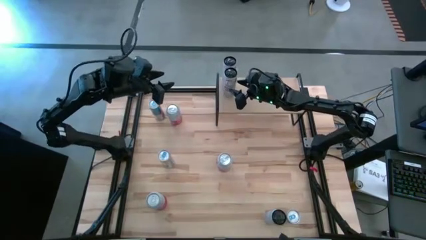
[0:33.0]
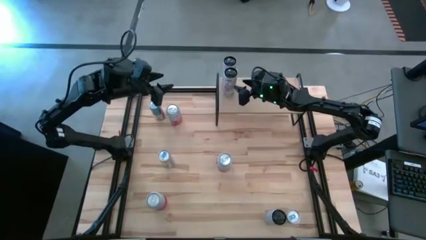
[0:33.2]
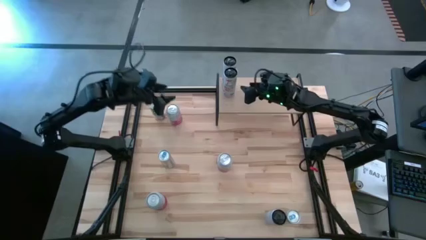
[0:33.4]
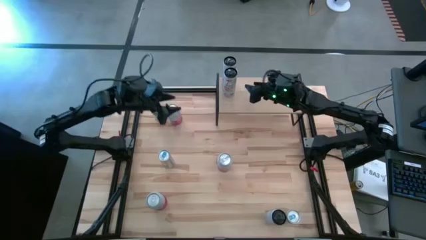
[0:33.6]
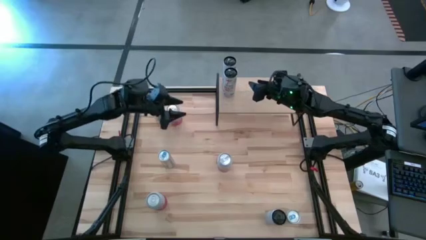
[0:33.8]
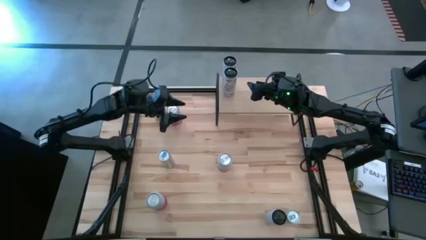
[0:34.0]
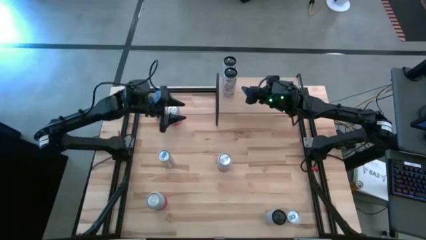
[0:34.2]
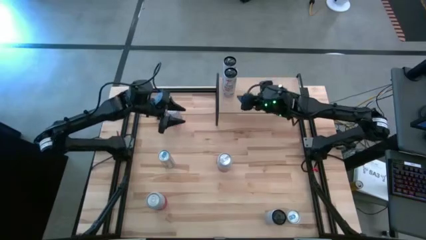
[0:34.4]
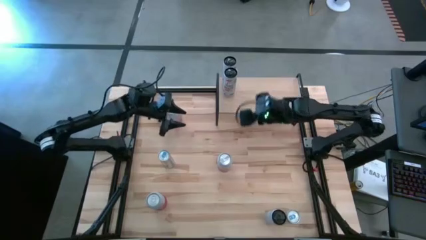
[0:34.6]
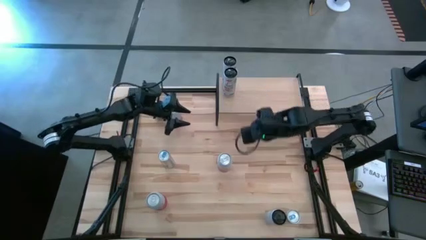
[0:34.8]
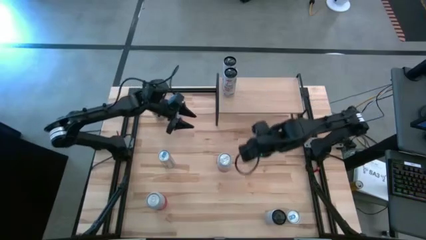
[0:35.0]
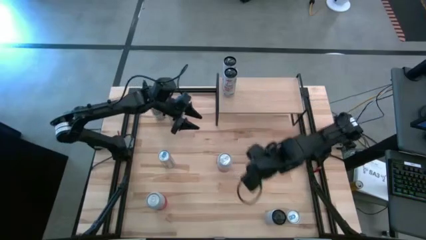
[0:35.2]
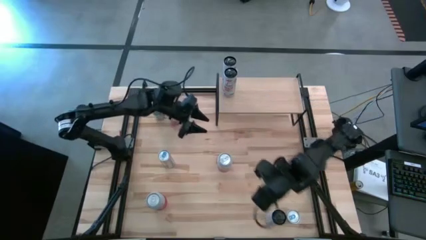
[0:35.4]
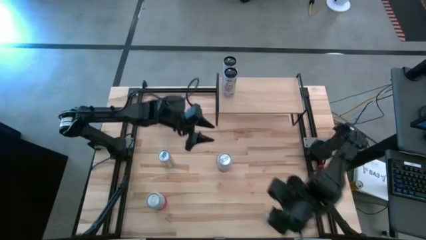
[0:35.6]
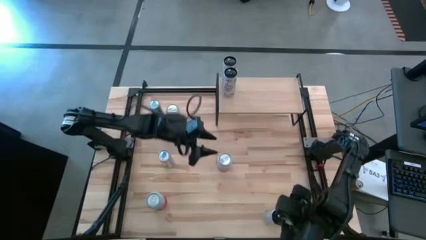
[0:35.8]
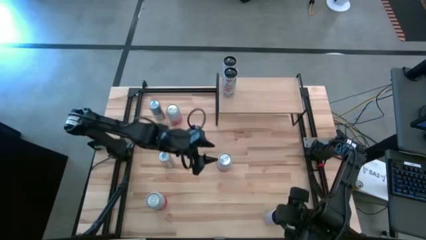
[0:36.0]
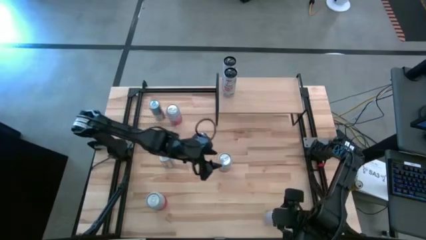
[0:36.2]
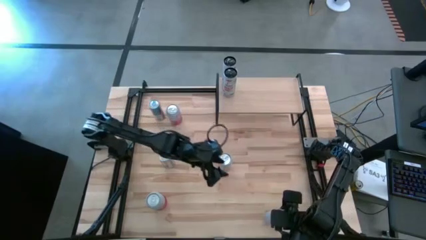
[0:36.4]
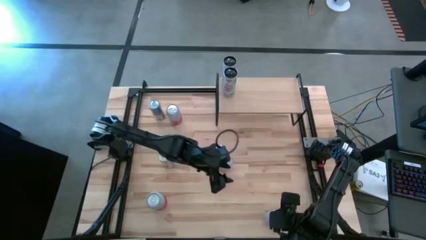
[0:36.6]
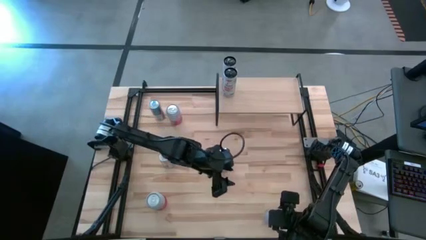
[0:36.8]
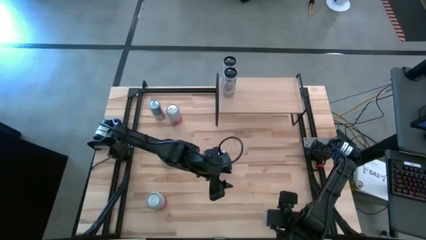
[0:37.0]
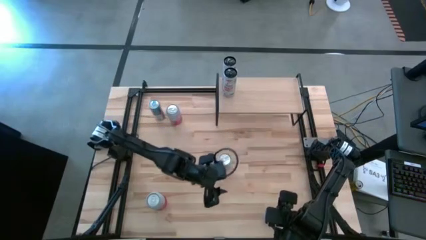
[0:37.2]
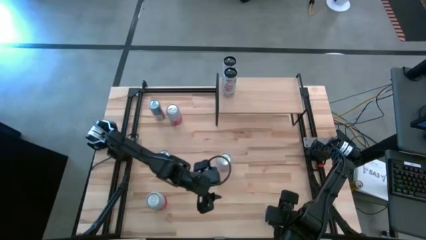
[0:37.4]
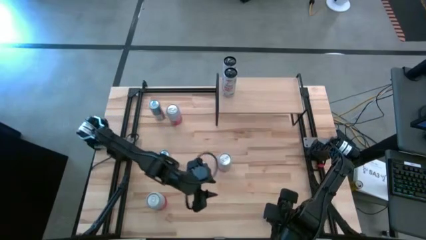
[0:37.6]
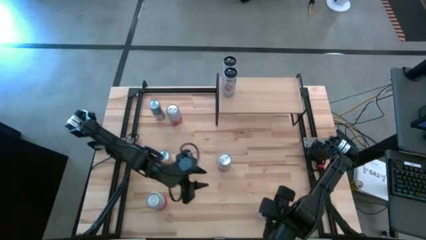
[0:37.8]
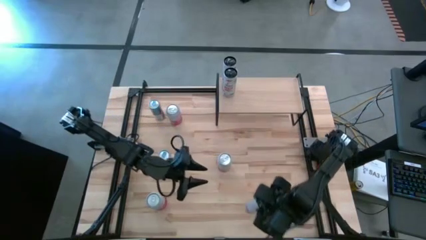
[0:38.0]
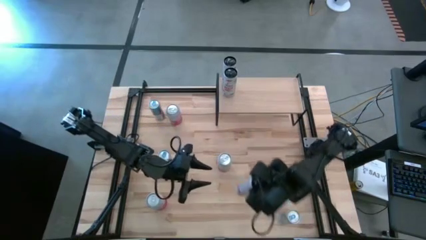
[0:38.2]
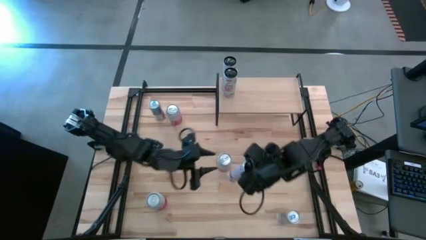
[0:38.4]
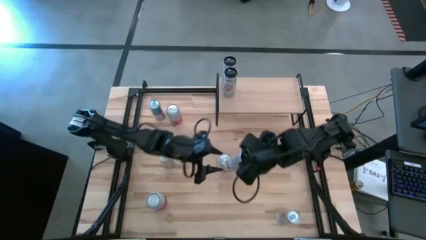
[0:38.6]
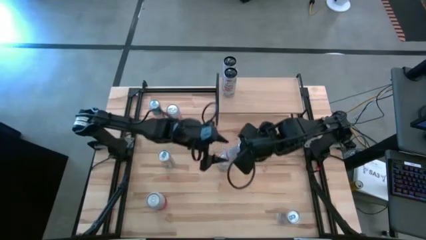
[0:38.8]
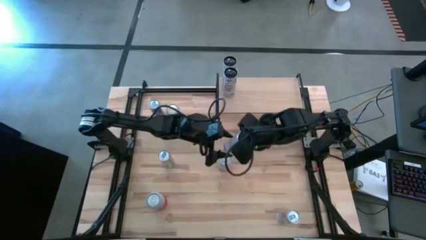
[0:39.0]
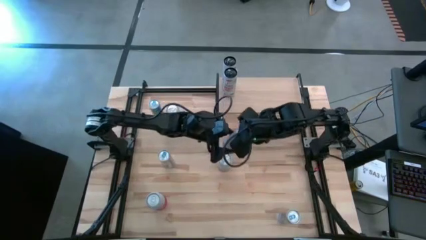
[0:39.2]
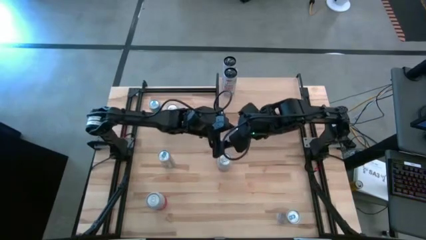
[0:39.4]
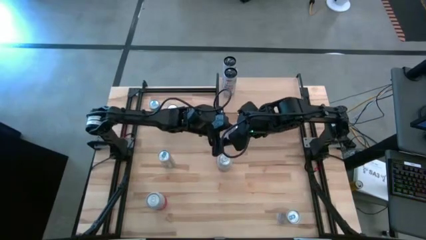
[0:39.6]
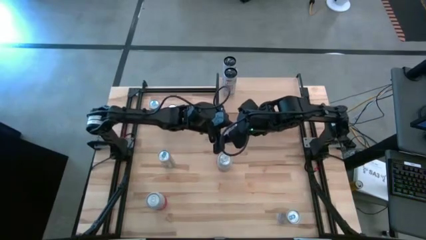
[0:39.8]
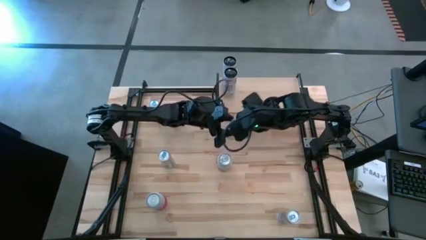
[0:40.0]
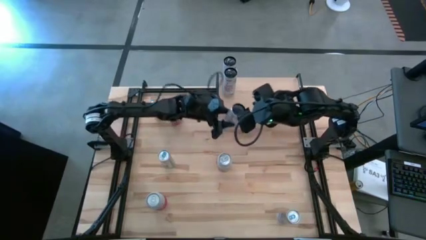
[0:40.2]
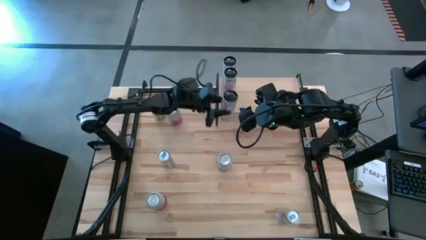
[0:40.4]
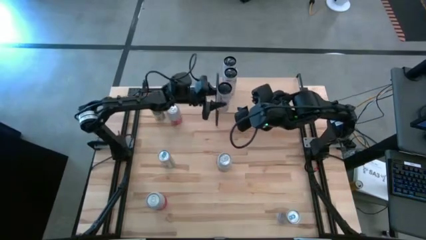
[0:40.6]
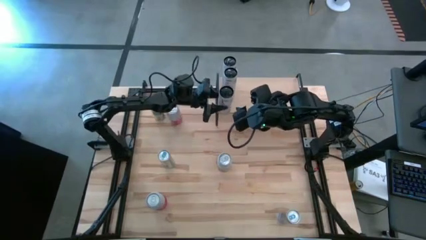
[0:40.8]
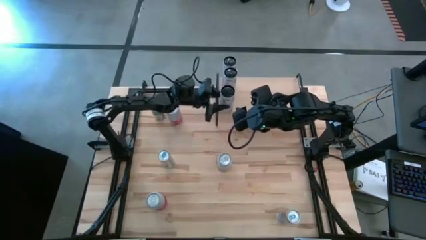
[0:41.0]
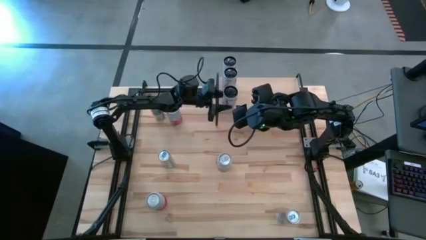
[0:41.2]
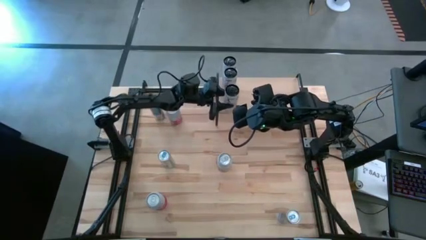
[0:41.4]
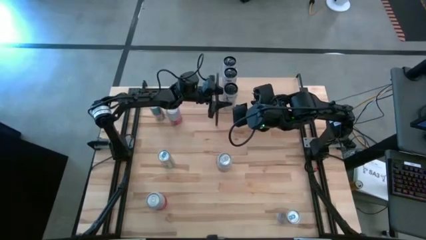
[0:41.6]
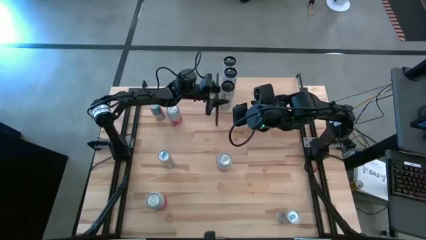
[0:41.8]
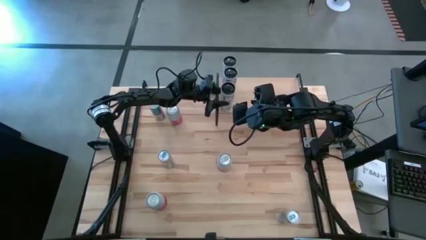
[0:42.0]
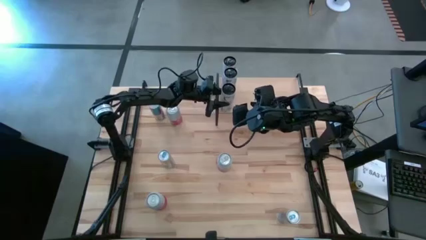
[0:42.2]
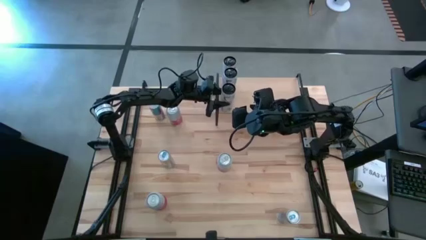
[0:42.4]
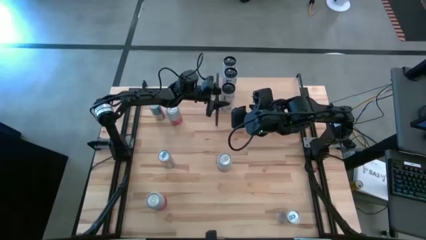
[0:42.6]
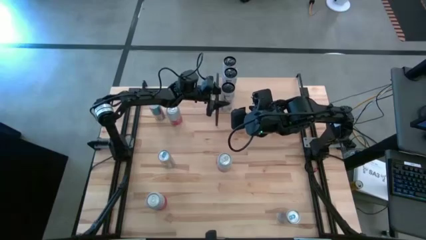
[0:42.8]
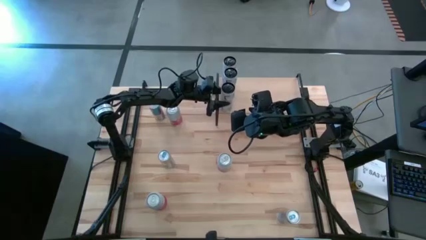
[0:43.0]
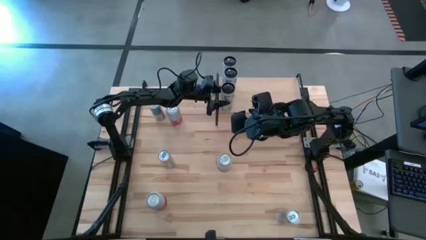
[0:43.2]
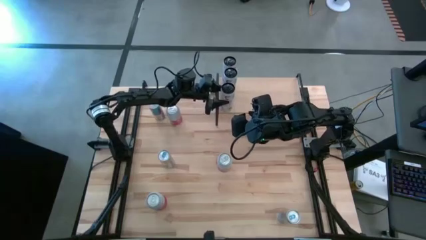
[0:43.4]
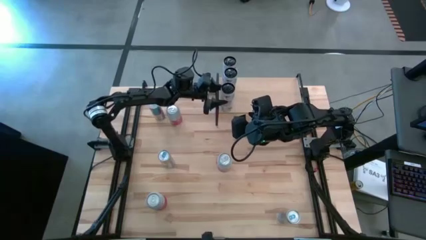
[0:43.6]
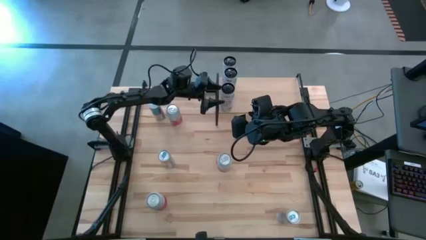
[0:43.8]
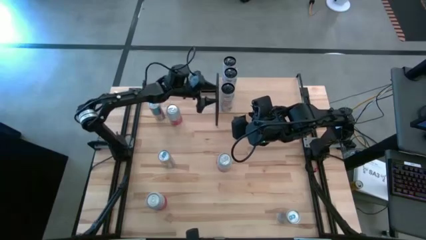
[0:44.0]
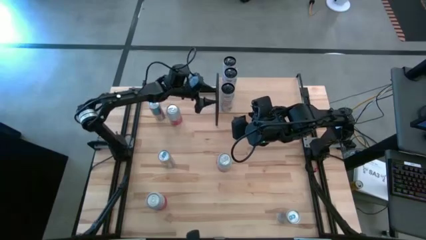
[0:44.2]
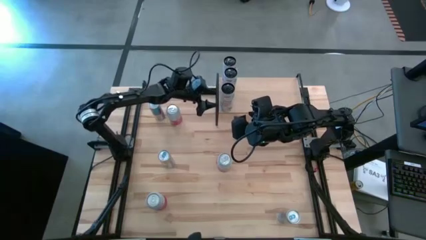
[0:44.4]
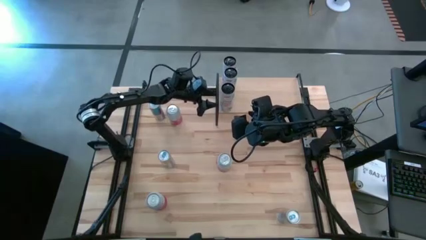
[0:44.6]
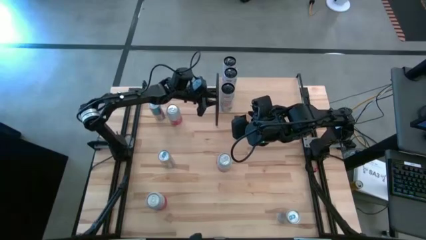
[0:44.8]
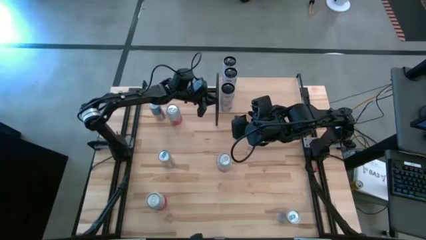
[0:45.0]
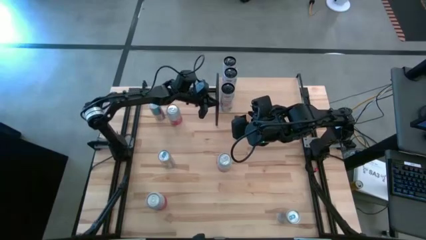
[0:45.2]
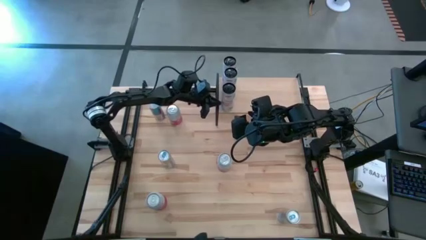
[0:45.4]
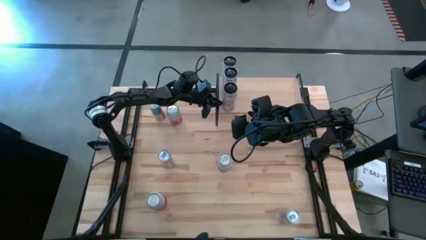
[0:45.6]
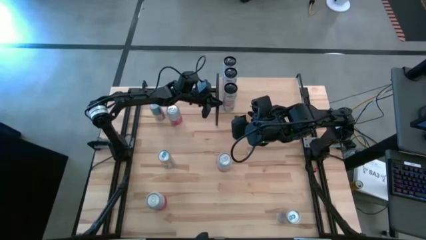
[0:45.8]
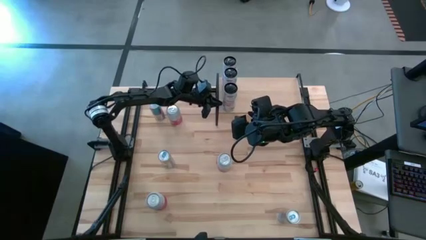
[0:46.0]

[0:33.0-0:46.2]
Task: Place canned beverage on shelf
Put the white and pink soda can aligned with the other white soda can on the shelf
